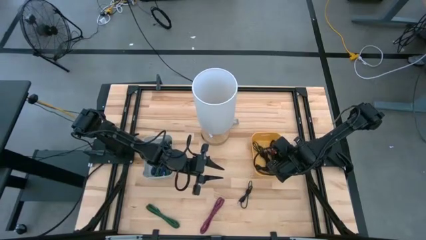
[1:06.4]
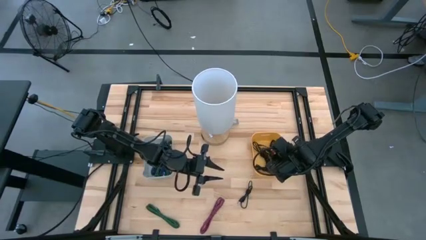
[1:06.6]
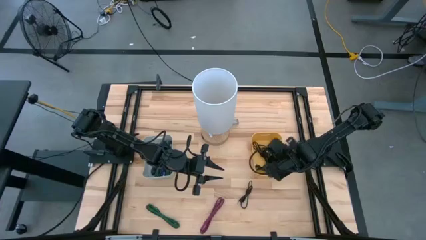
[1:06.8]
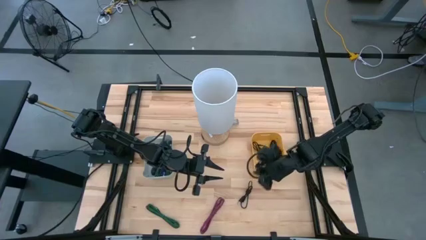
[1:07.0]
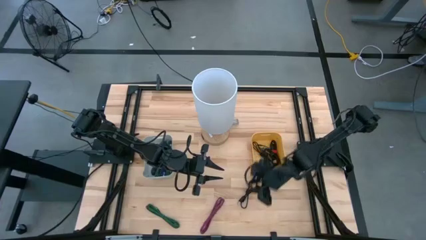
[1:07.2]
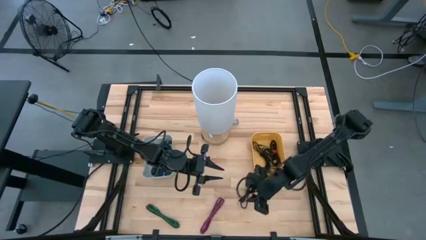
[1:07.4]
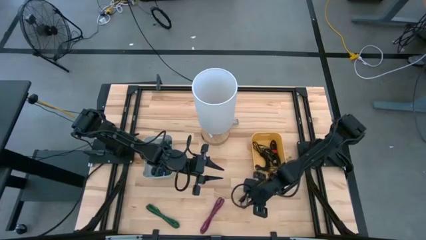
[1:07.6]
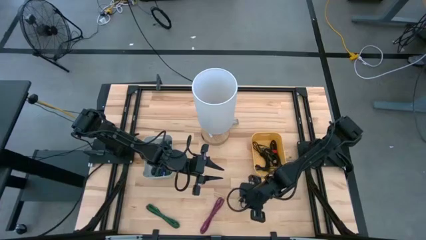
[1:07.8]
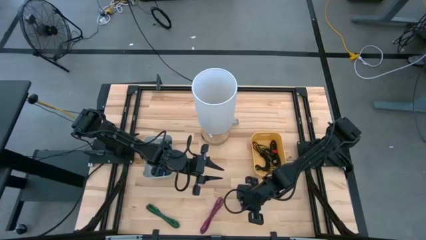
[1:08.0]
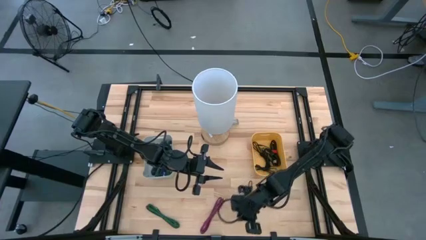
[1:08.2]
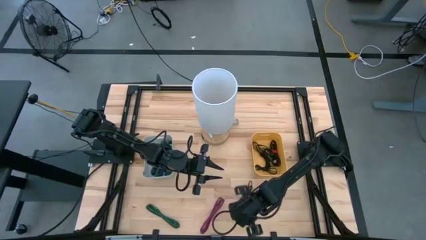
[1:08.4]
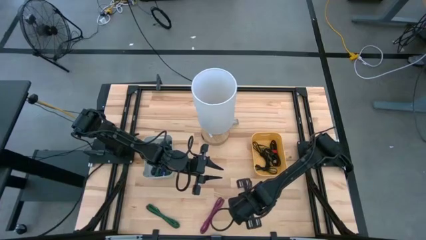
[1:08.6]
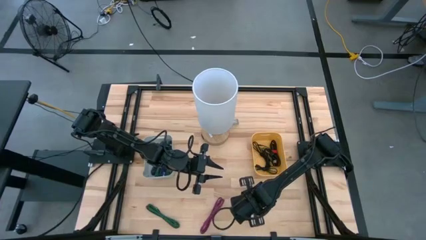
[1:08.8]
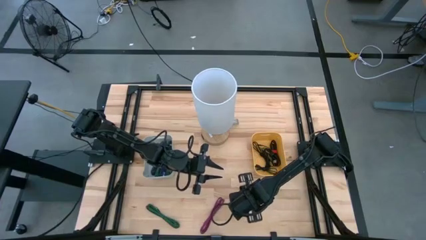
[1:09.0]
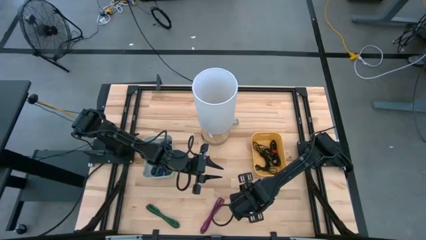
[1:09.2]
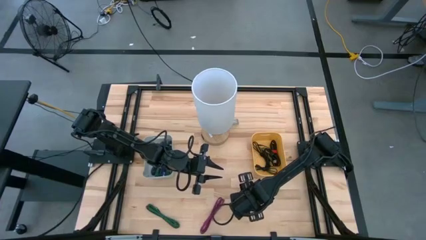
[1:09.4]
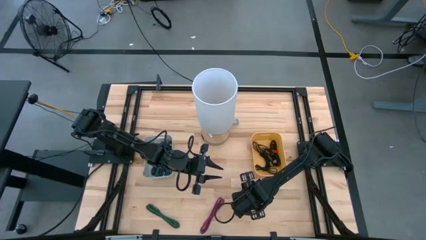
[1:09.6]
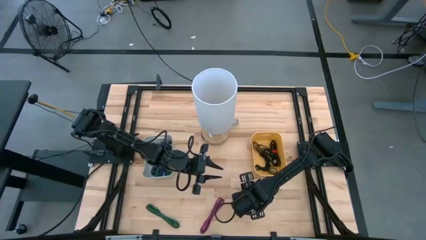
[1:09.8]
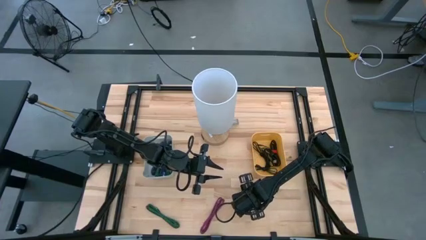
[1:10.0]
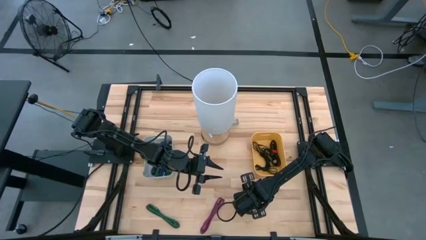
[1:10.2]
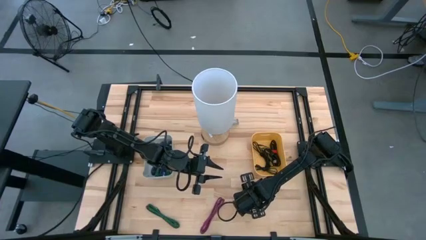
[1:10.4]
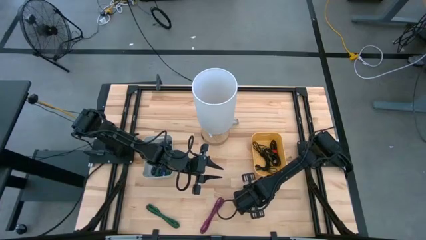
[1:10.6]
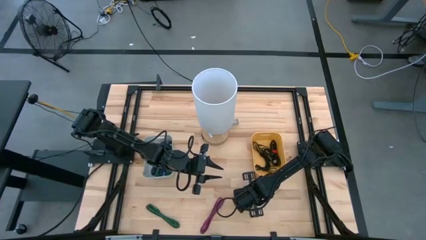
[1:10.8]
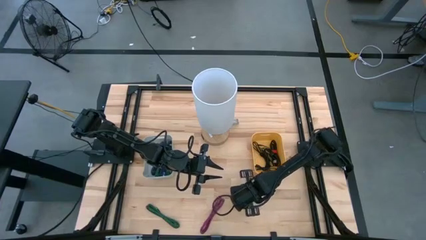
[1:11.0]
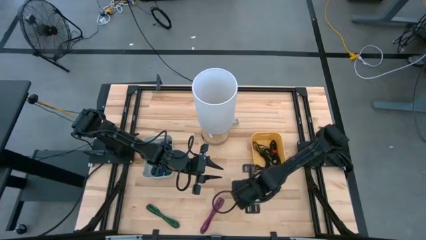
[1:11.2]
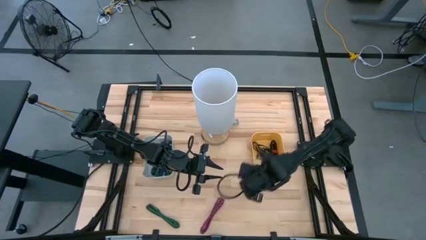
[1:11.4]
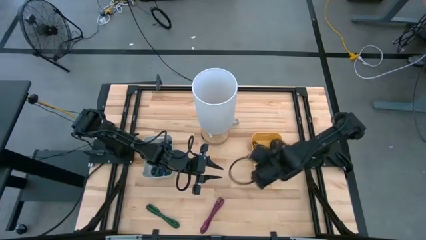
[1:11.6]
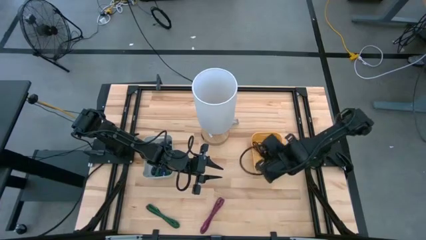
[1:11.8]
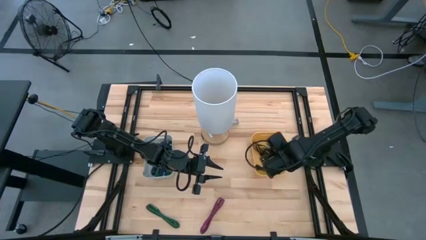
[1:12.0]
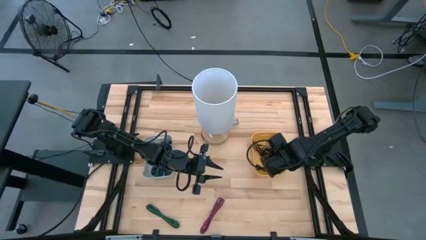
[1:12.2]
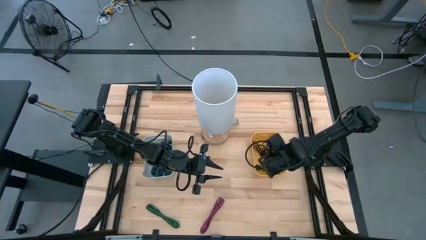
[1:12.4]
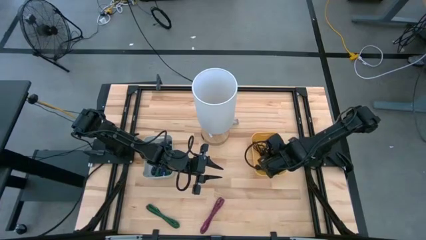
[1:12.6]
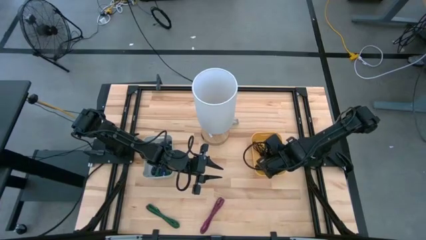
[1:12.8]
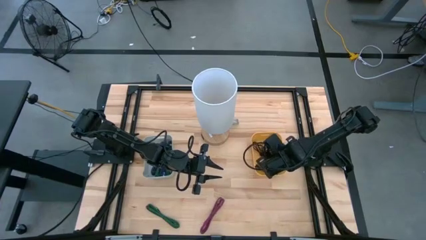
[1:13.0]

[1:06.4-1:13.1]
Task: Pick & Place USB Port
Put the black USB charger into the yellow bin

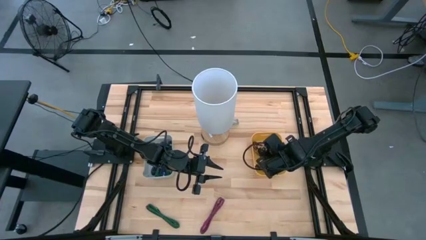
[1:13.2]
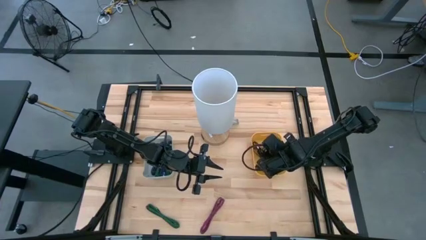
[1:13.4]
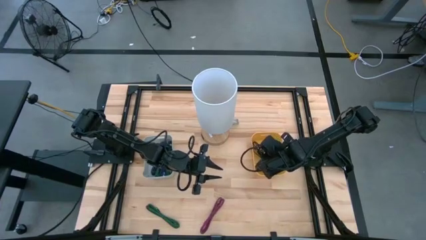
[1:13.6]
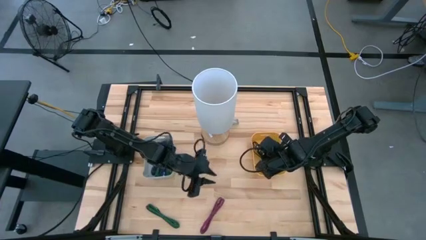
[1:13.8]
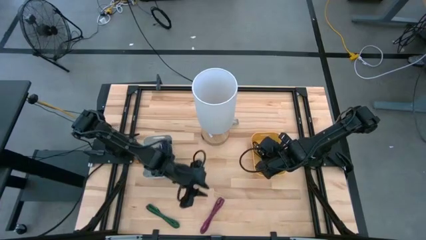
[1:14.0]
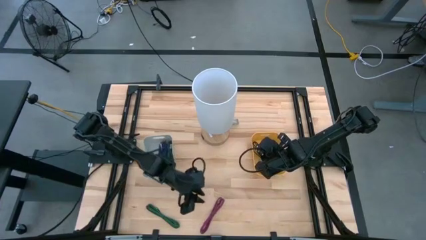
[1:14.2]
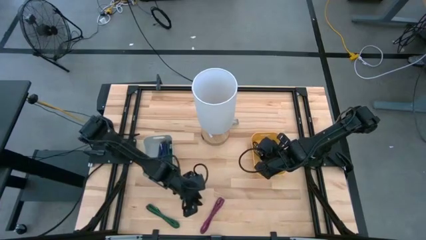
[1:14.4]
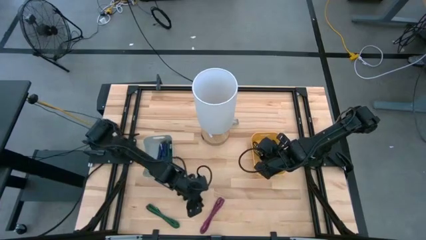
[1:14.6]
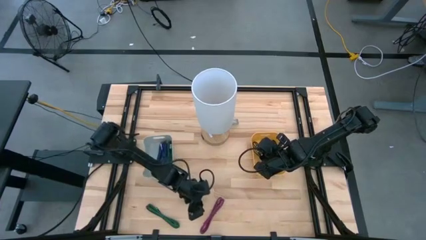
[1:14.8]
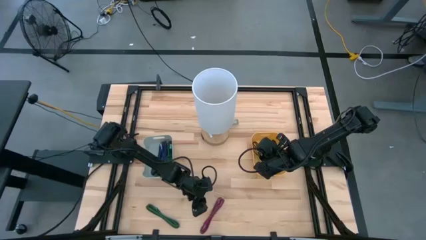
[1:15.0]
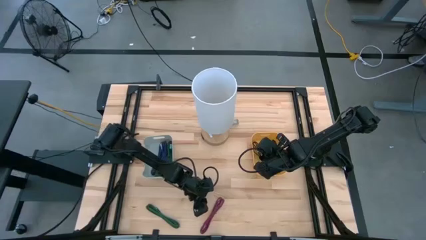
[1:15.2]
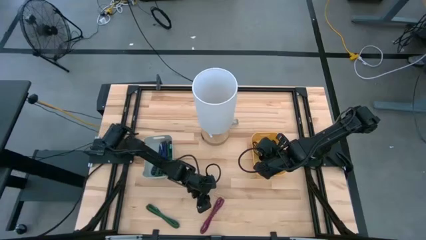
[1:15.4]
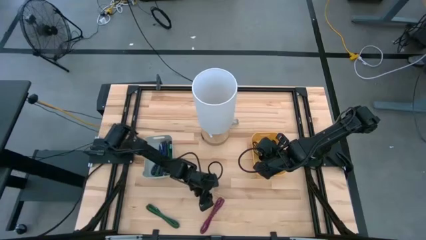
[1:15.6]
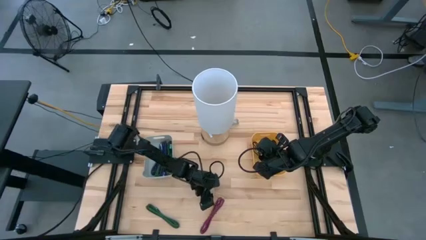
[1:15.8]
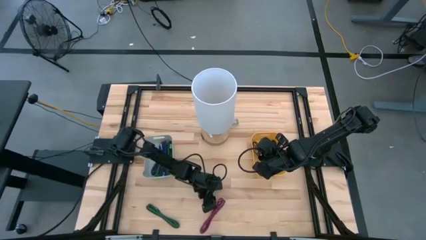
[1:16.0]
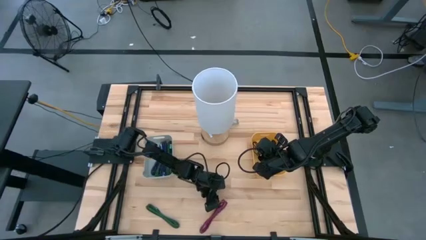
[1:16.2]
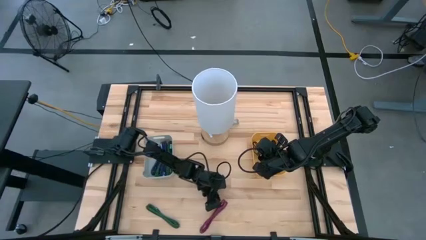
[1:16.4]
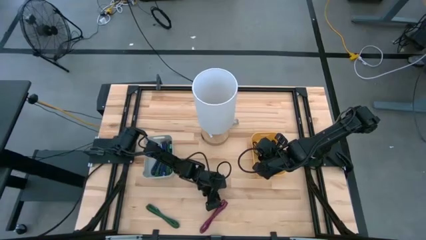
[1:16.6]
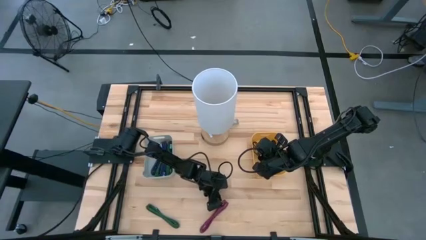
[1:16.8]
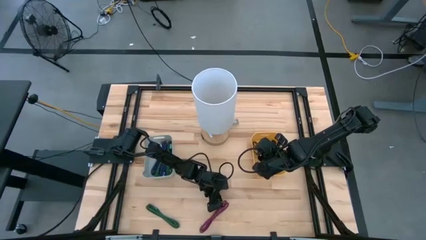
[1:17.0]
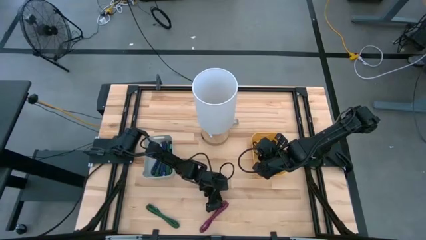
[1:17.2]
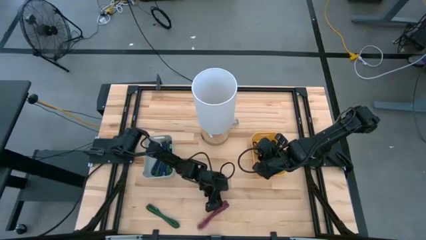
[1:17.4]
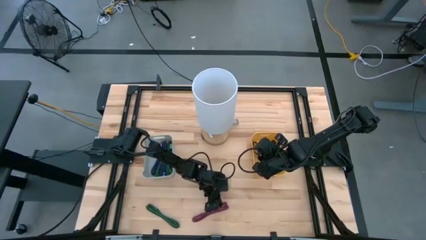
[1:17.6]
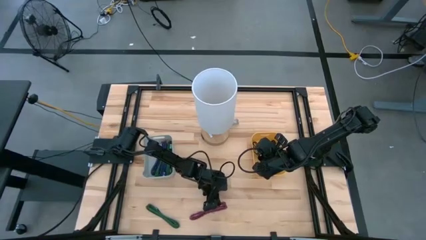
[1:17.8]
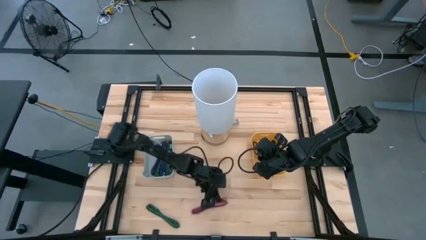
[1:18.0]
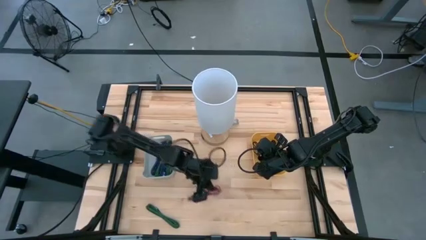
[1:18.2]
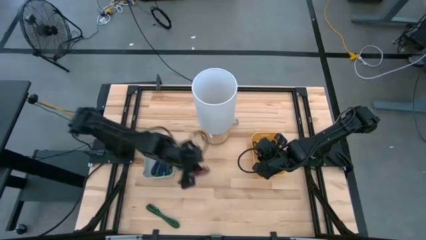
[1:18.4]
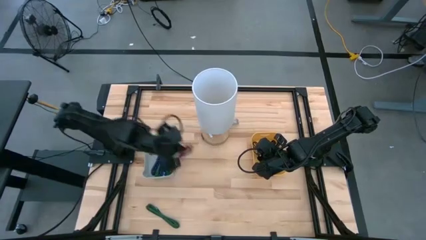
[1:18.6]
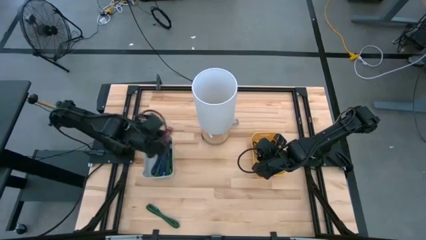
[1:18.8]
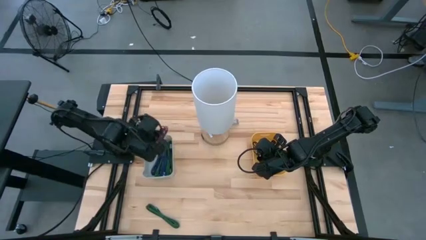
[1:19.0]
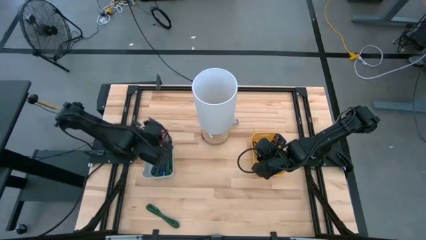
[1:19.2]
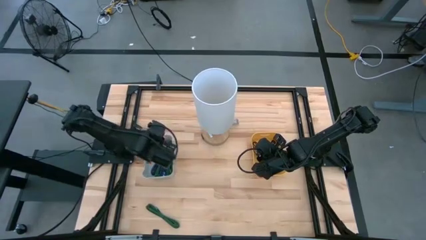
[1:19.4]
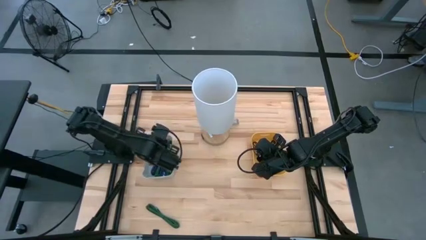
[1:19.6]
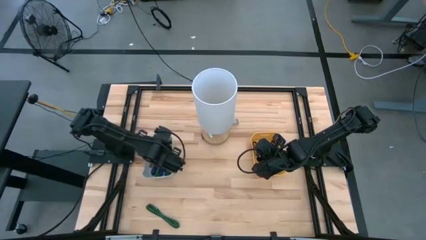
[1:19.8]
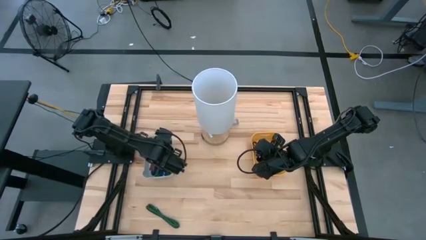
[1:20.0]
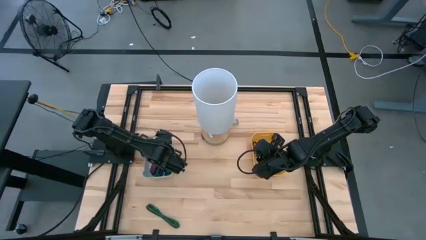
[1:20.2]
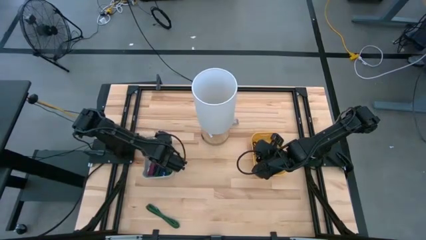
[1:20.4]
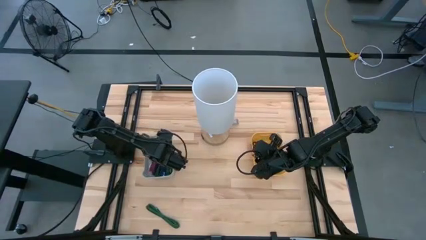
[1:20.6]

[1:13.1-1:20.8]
Put the pink patterned USB charger into the gray bin

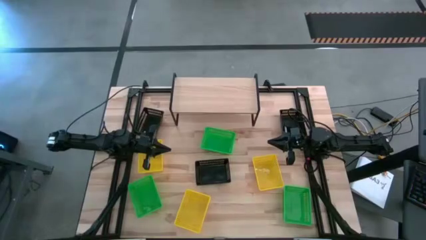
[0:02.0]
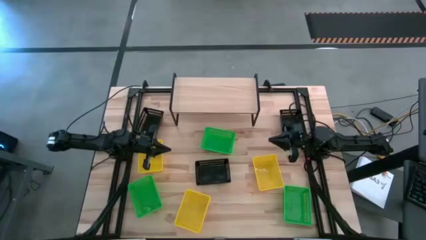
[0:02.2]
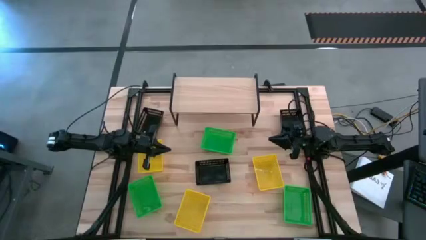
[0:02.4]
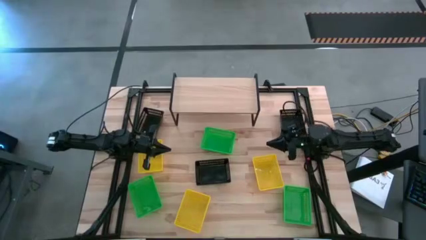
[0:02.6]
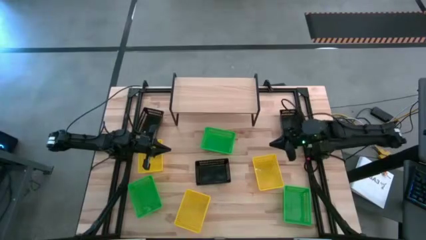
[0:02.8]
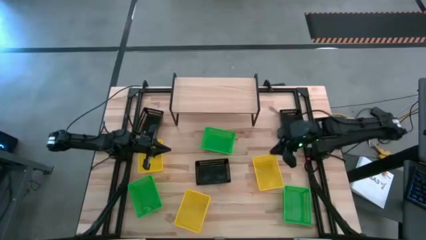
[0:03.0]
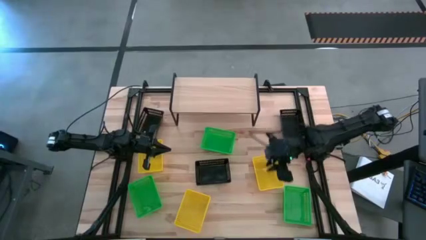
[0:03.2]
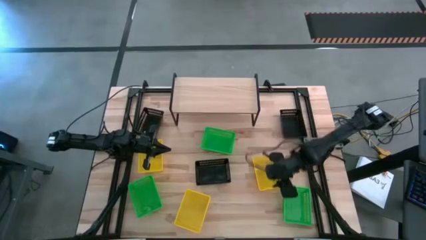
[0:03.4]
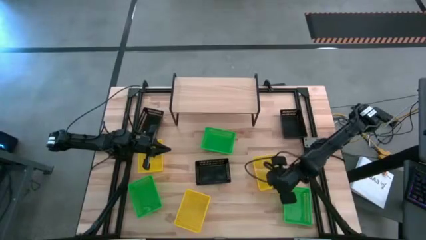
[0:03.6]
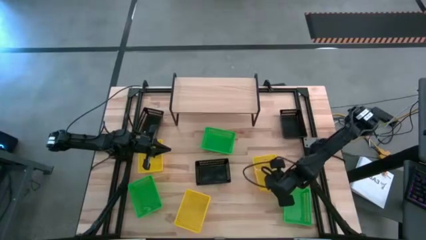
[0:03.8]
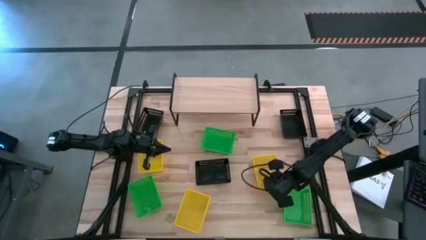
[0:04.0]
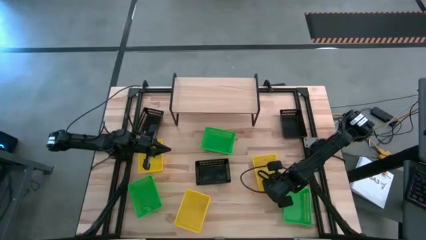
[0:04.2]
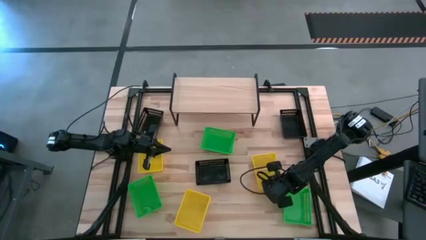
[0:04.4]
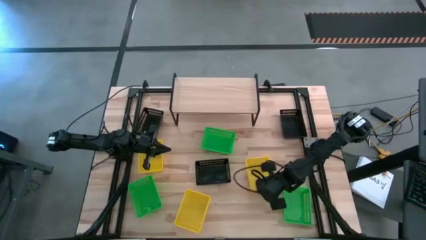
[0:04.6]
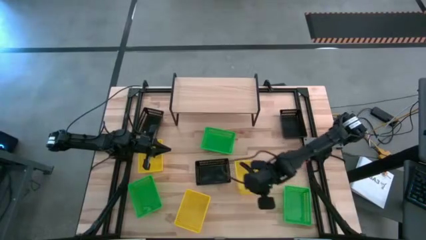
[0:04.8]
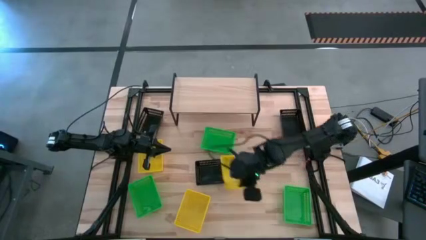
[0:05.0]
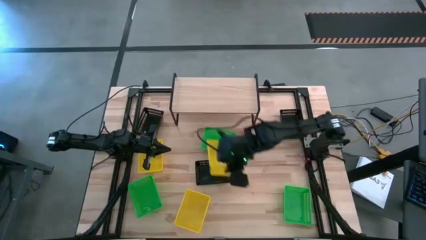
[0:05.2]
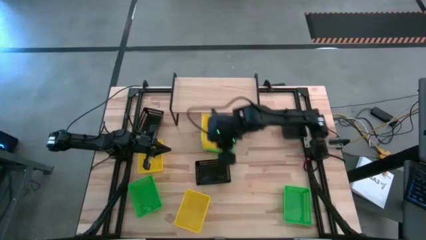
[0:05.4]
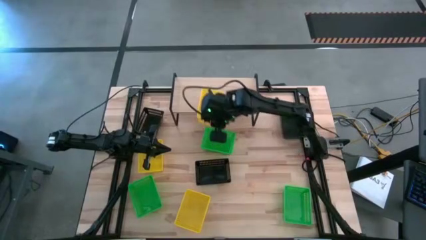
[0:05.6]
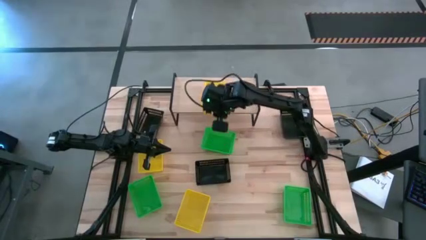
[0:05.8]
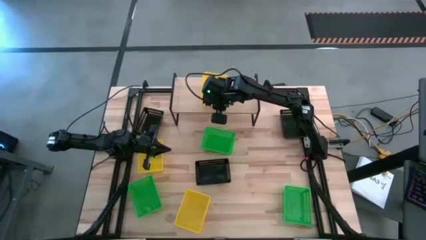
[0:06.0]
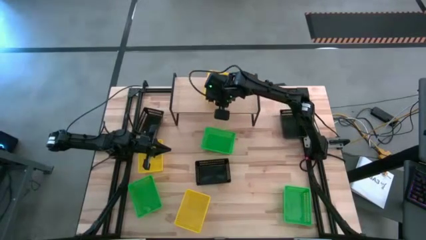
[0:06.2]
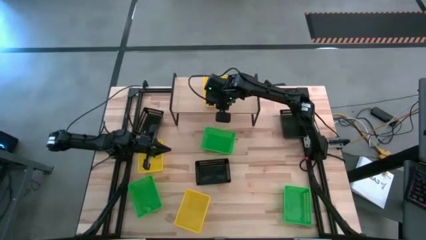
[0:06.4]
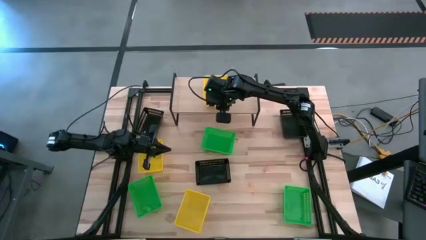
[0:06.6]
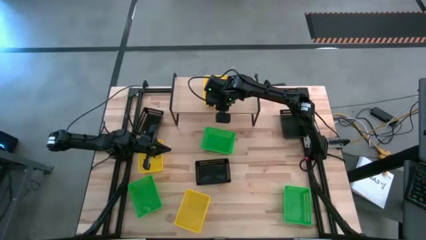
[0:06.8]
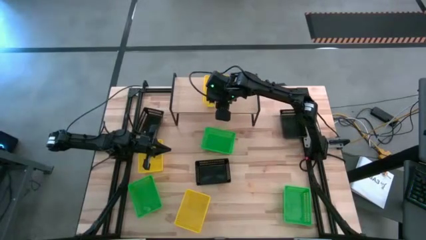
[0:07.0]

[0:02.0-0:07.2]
Task: Stack baskets on shelf by color
Put the right yellow bin on the shelf
